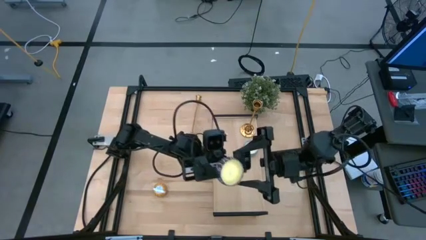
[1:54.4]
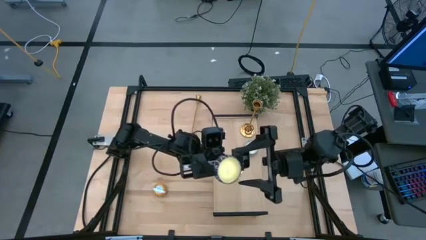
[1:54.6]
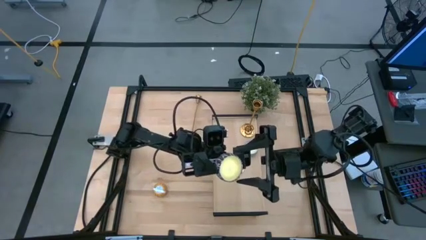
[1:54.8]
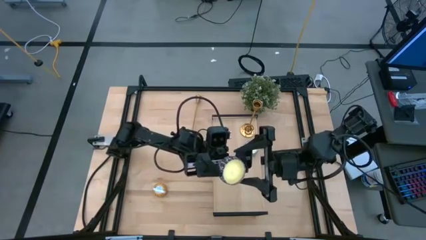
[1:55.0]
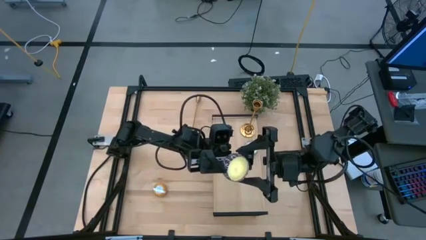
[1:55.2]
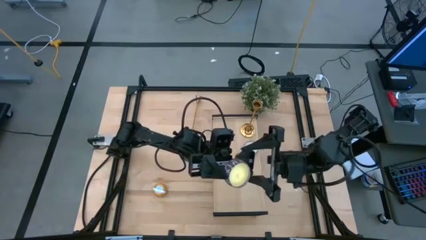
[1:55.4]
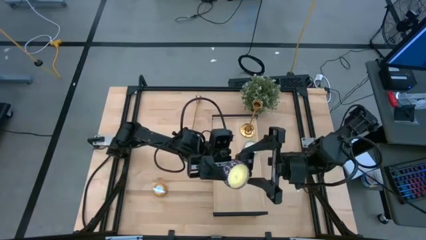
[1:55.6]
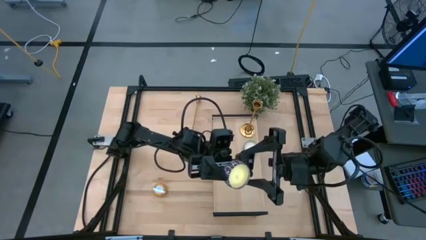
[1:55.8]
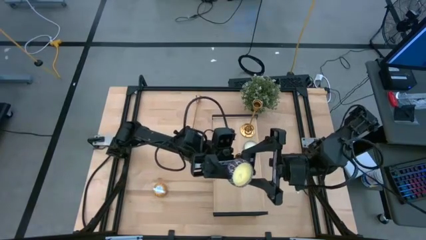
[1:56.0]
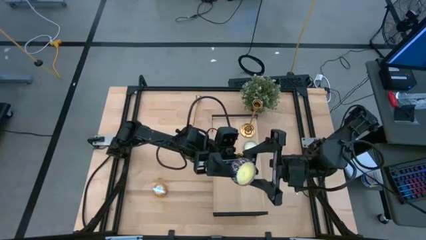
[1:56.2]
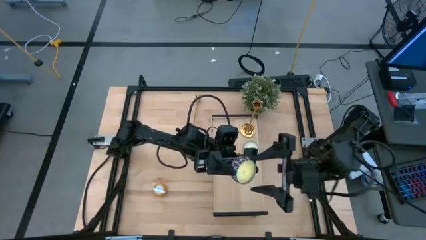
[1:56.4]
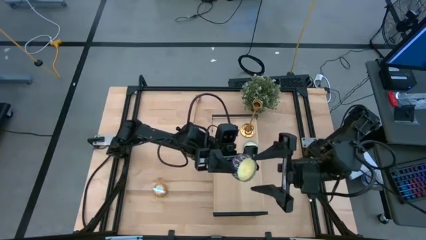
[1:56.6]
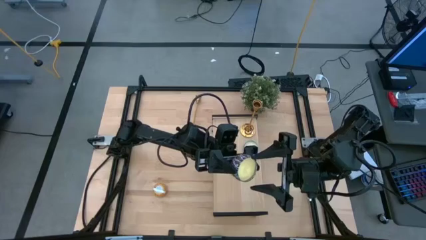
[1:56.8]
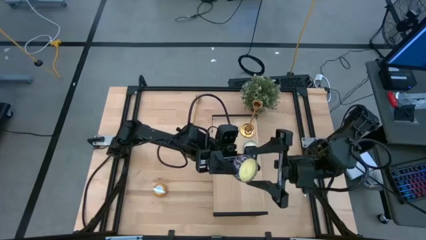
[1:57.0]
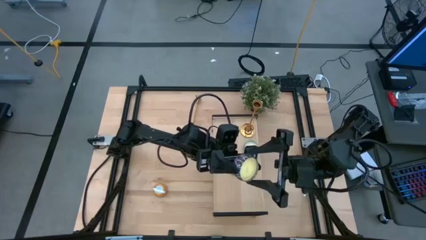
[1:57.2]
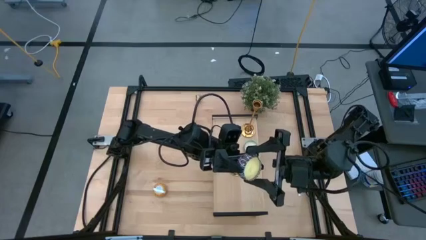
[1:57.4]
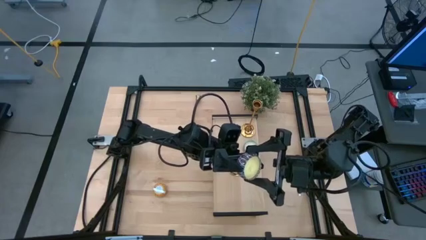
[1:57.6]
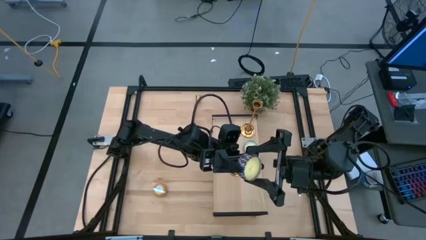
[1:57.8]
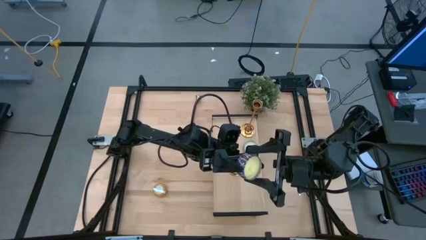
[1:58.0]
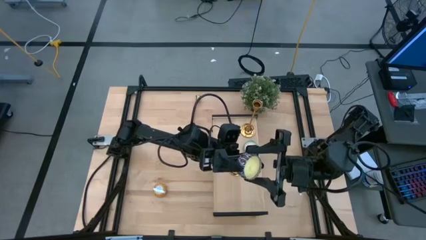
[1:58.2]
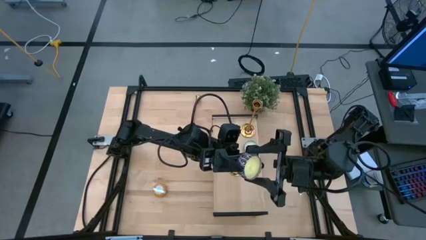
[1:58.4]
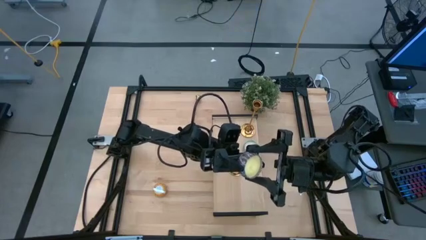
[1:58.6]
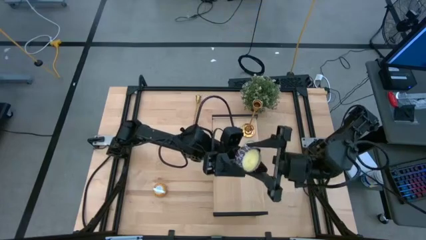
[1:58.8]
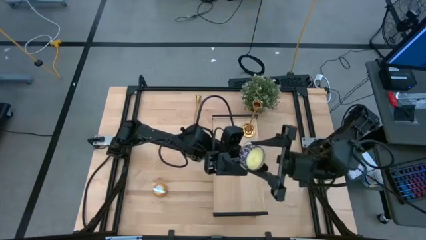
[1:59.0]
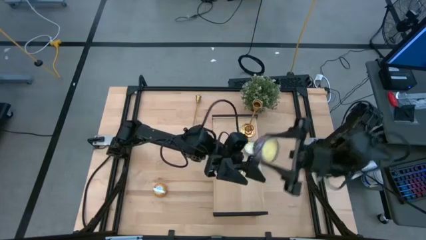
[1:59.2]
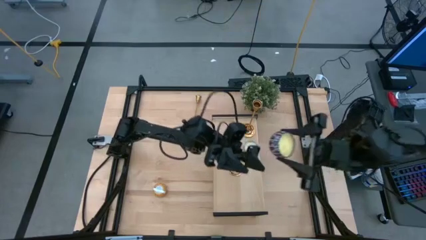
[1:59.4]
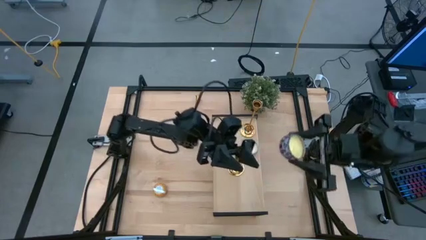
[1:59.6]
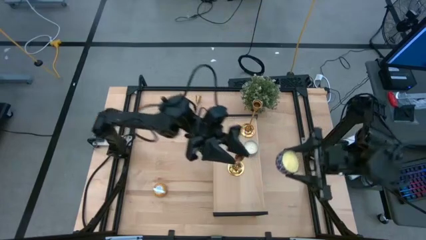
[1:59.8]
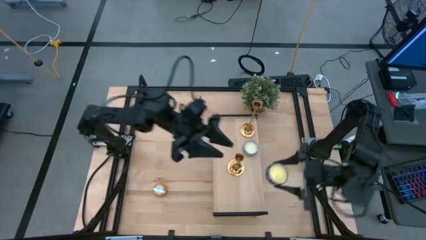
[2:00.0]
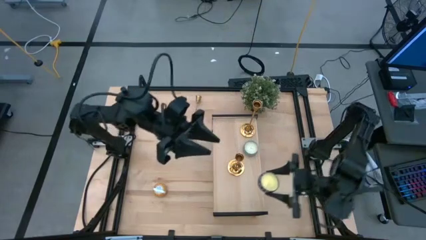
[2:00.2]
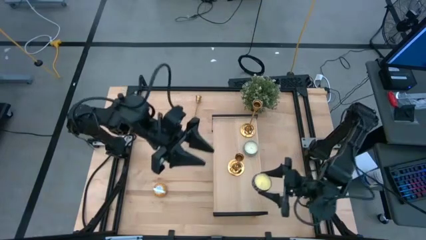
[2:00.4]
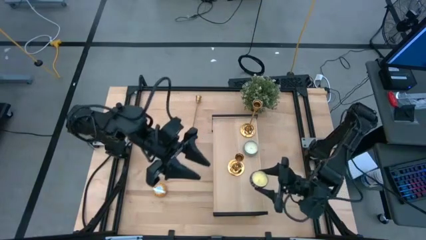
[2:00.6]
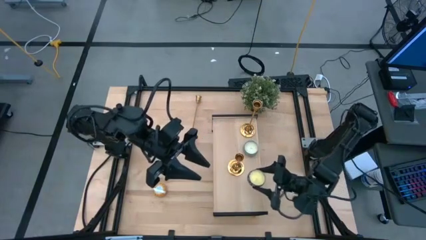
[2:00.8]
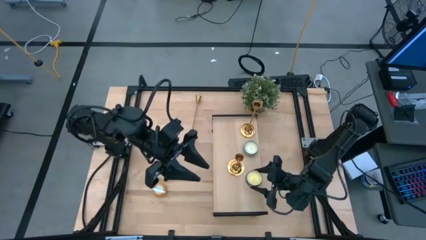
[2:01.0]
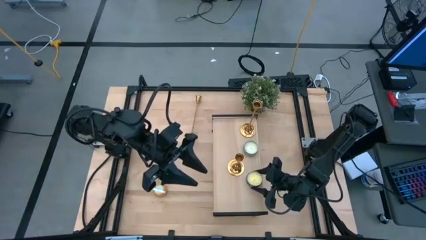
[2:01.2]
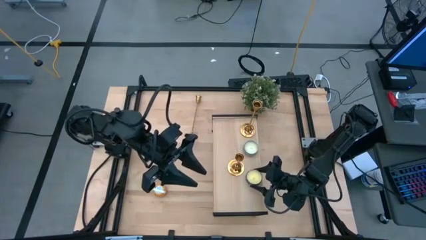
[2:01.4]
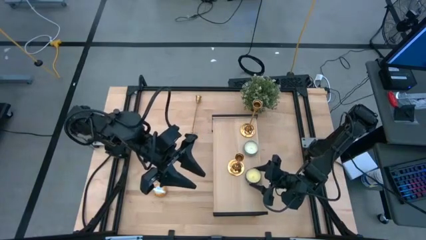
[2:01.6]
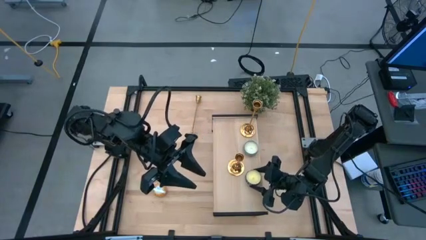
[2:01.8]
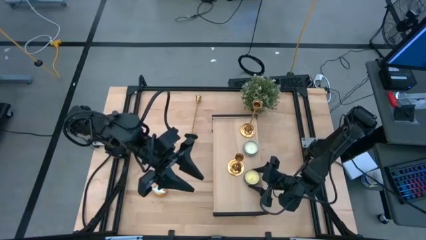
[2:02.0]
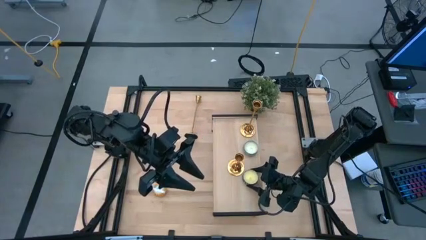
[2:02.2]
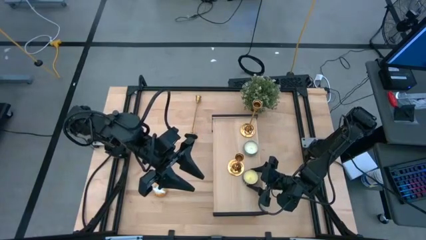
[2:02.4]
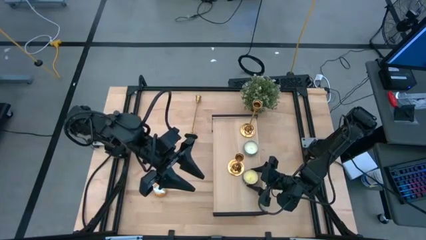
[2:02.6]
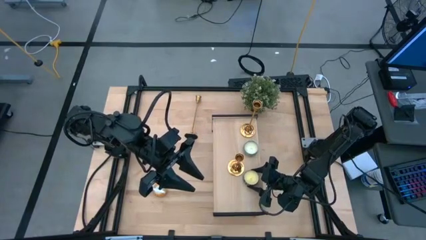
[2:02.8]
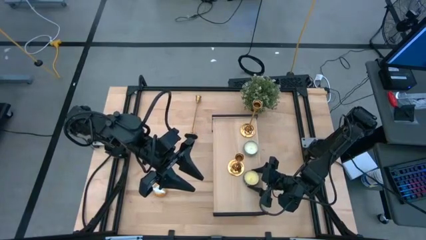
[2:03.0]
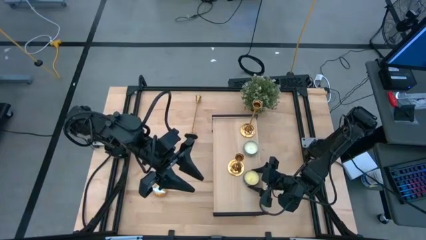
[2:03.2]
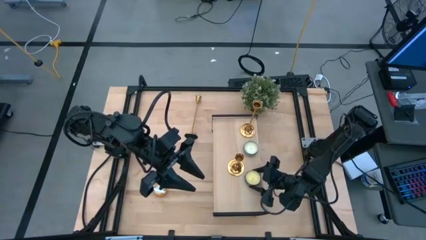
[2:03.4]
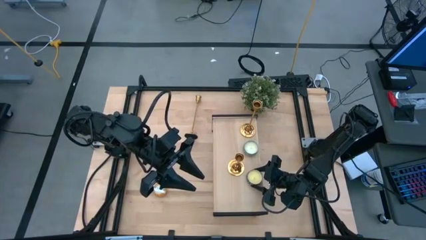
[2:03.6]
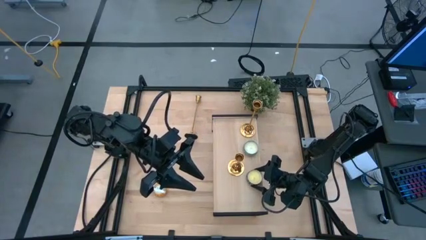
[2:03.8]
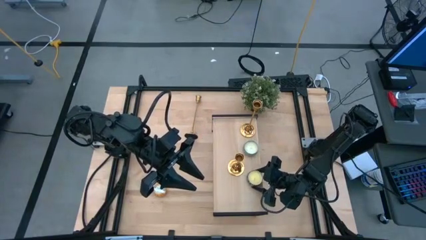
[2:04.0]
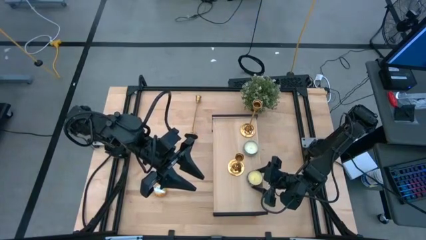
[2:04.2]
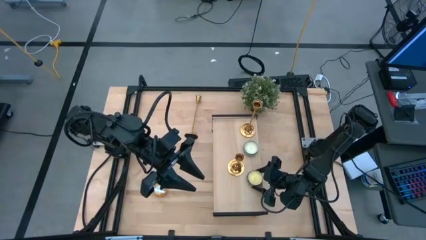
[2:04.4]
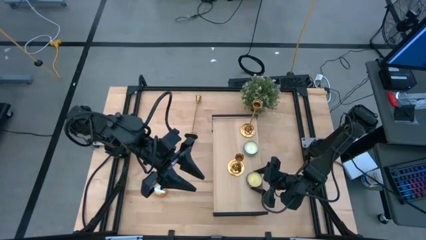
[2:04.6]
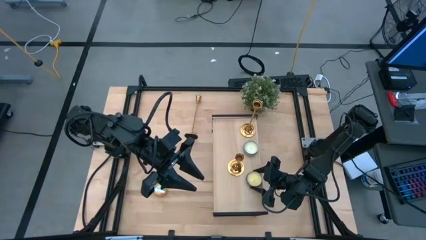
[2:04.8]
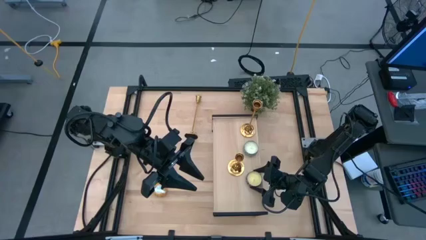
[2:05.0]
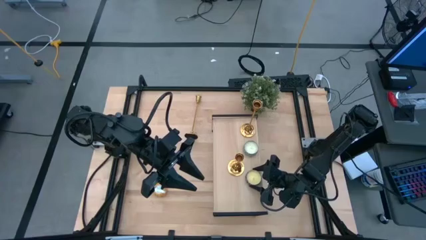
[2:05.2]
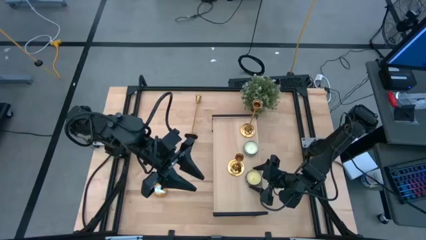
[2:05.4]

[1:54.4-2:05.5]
Task: Pick & Place candle stick holders
Put the red patterned scented candle on the shelf

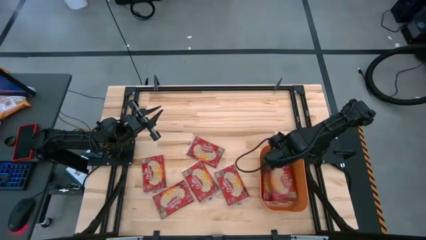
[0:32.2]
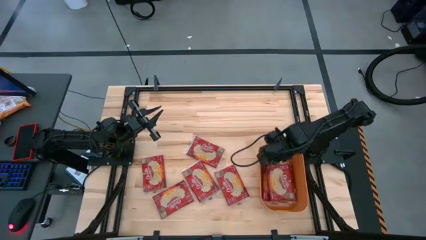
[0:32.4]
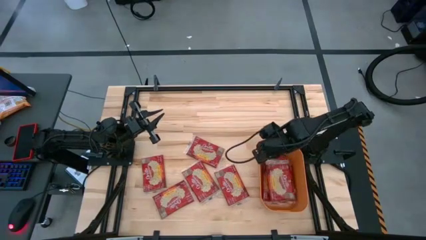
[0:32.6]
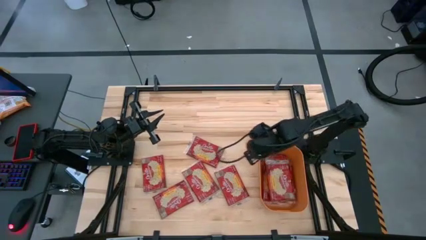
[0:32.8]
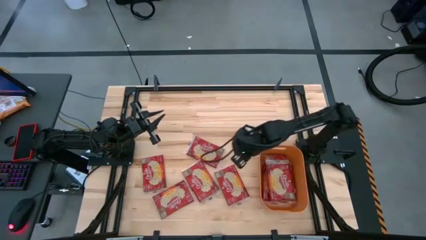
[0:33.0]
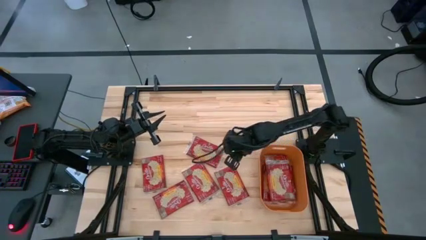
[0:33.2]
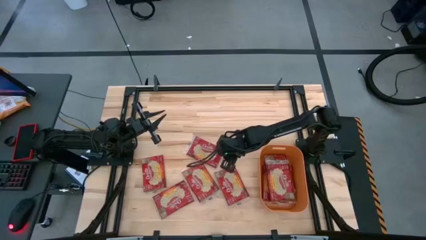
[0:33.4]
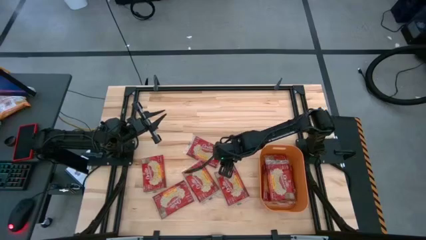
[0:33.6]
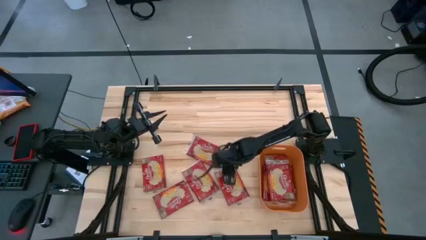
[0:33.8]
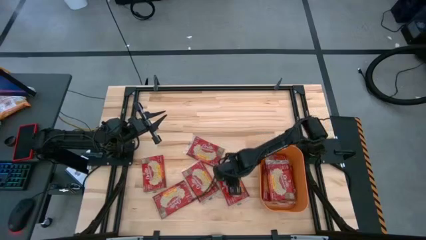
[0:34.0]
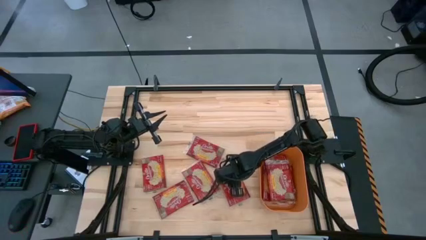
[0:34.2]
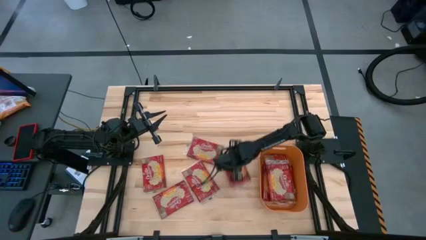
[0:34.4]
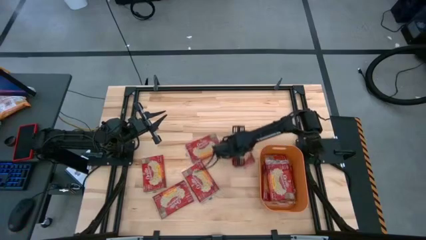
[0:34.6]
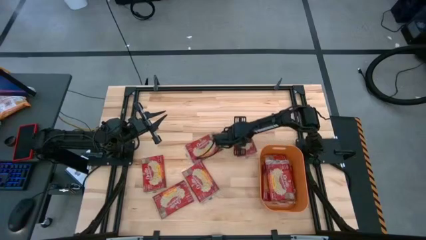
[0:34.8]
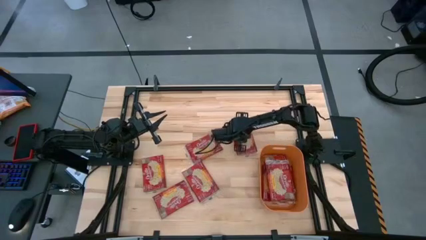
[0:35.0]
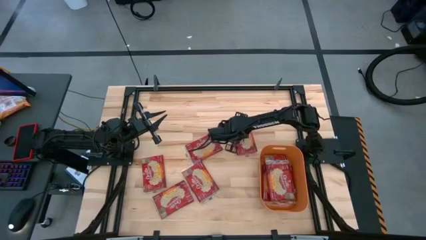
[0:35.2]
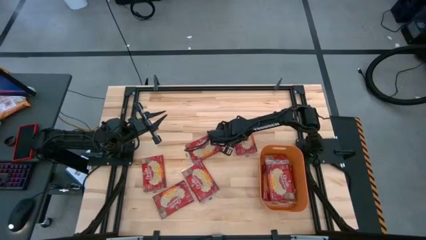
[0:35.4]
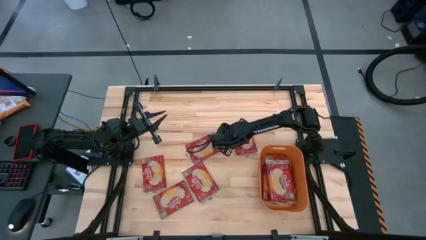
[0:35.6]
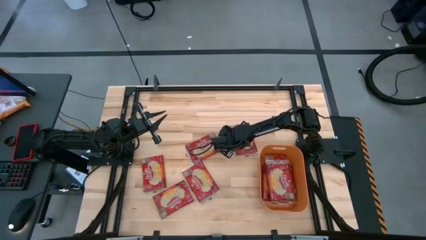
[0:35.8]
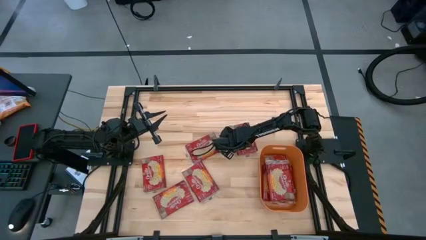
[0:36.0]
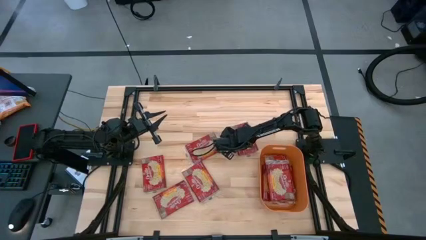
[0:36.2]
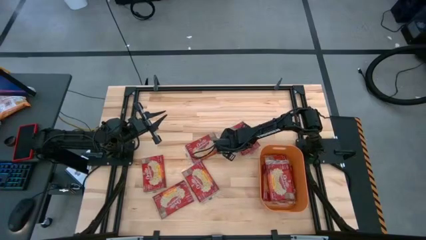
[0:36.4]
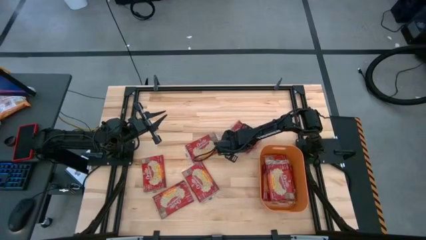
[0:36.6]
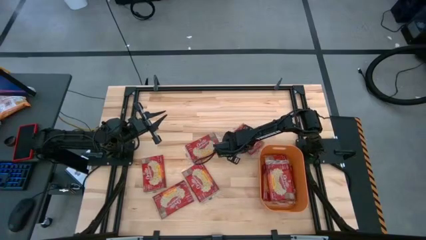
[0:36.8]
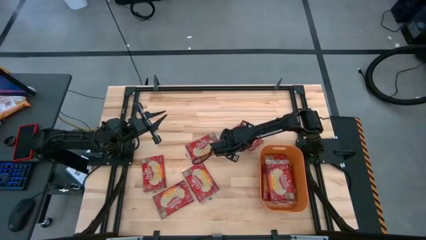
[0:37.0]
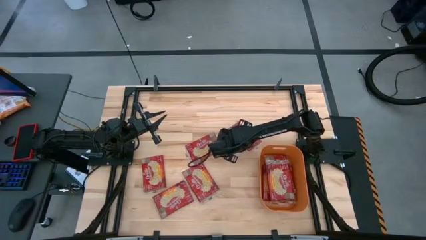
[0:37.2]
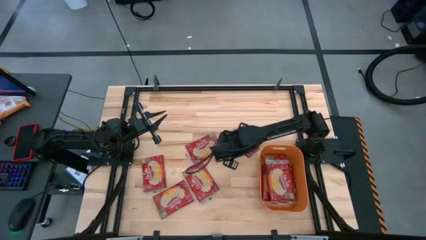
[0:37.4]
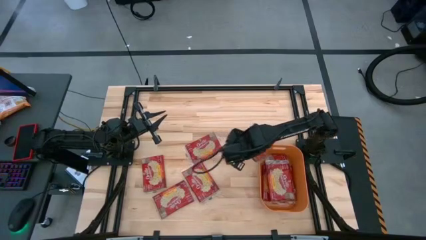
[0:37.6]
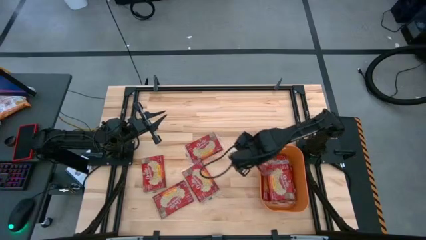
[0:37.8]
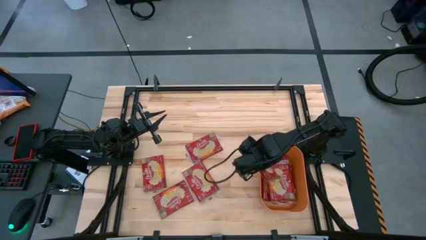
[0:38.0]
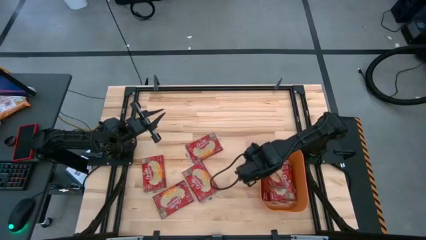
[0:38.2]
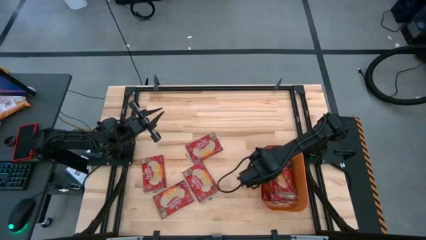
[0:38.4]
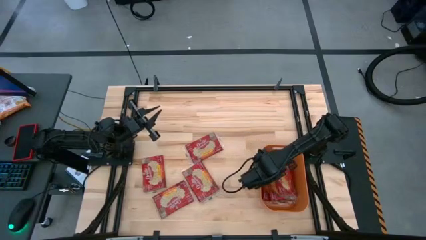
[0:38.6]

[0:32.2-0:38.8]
Task: Sort popcorn bags into baskets
Put the red popcorn bag into the orange bin
